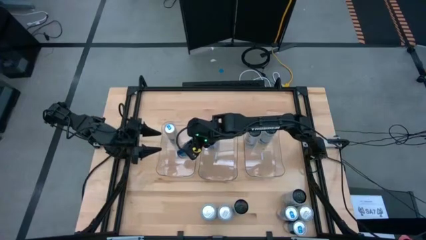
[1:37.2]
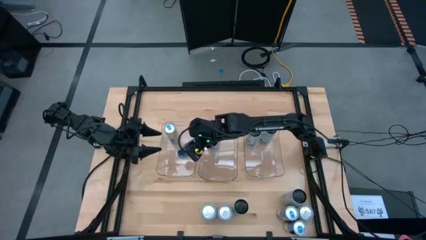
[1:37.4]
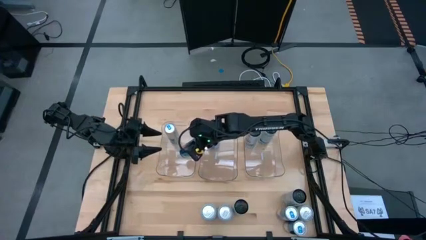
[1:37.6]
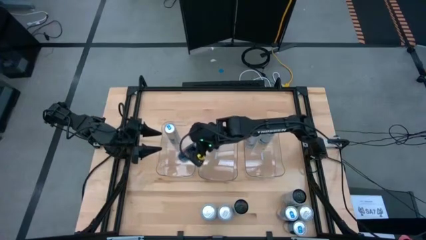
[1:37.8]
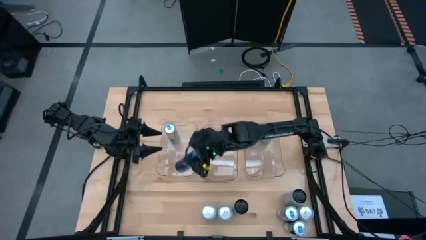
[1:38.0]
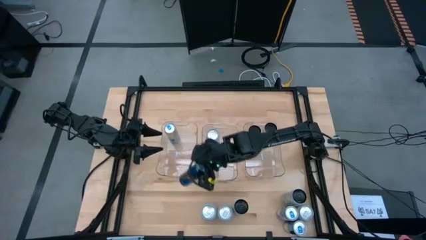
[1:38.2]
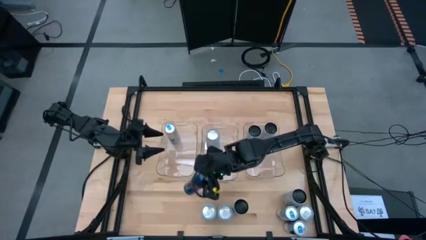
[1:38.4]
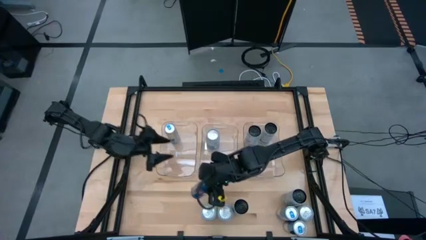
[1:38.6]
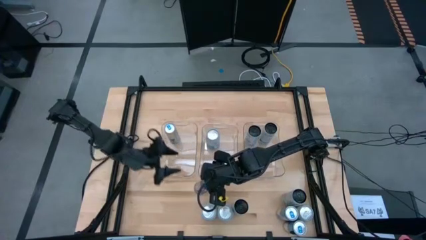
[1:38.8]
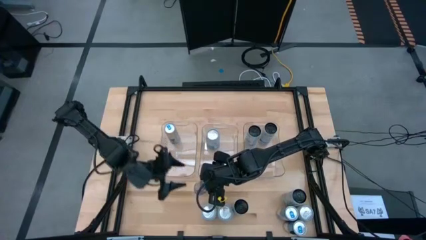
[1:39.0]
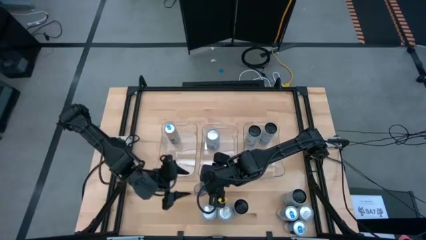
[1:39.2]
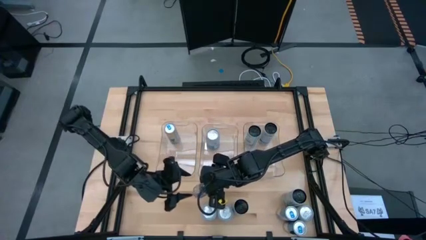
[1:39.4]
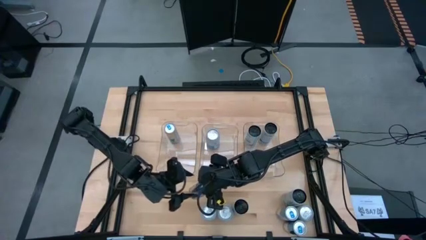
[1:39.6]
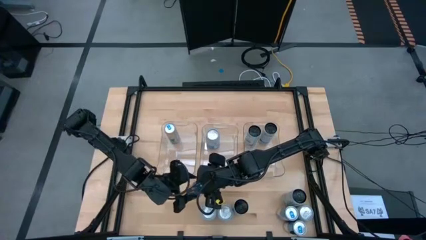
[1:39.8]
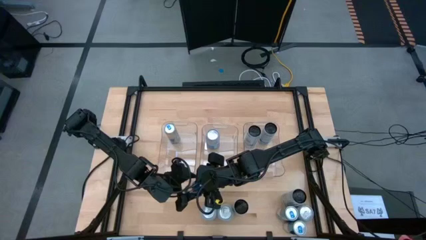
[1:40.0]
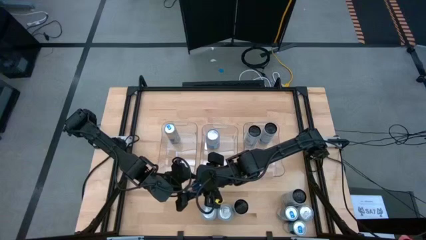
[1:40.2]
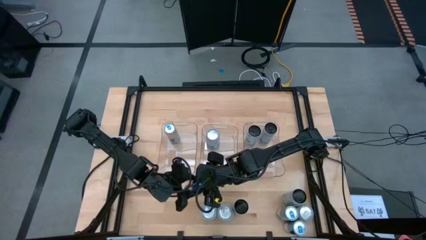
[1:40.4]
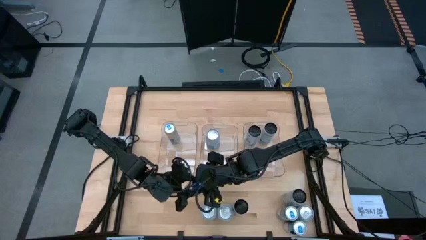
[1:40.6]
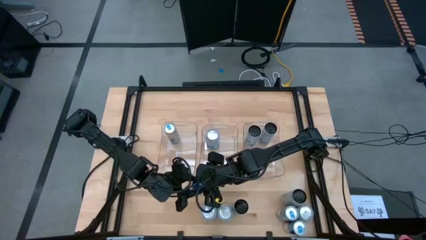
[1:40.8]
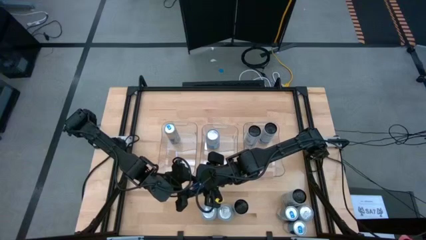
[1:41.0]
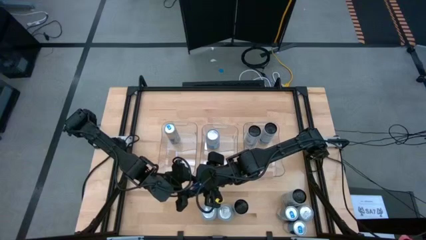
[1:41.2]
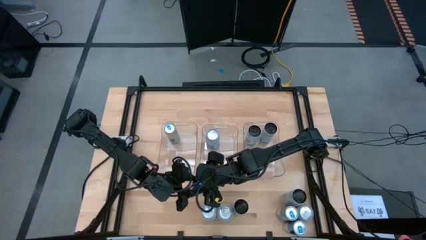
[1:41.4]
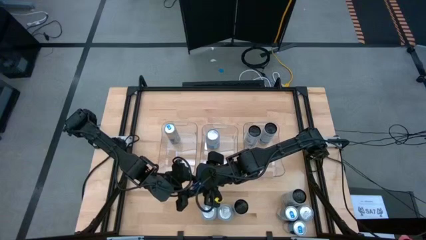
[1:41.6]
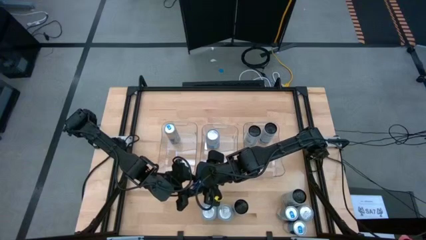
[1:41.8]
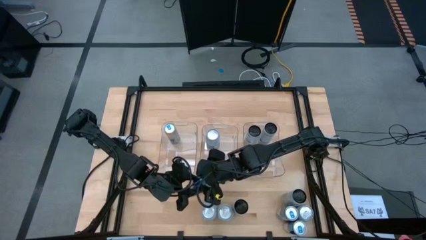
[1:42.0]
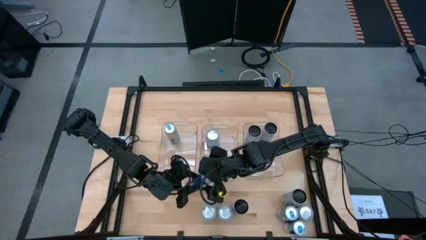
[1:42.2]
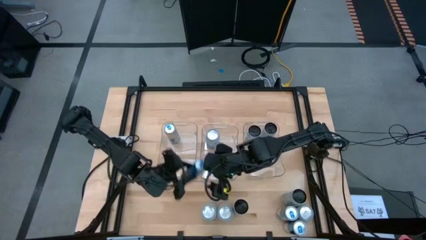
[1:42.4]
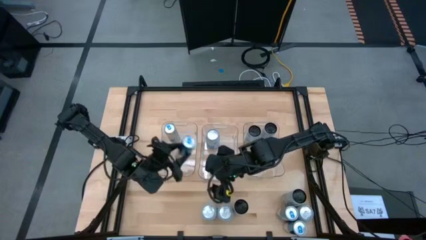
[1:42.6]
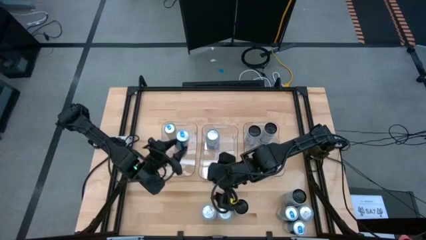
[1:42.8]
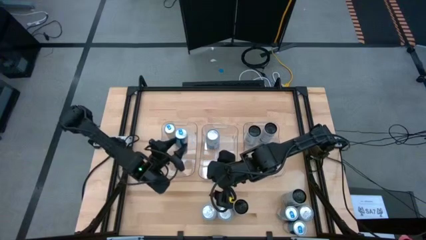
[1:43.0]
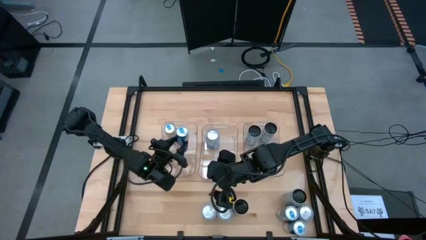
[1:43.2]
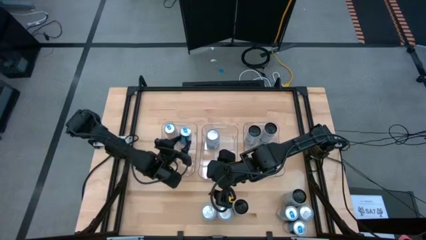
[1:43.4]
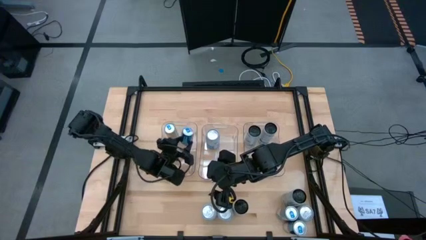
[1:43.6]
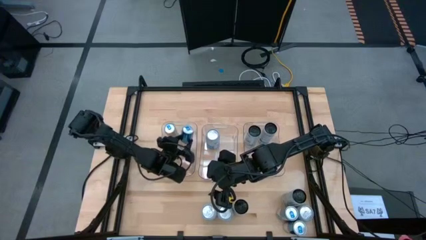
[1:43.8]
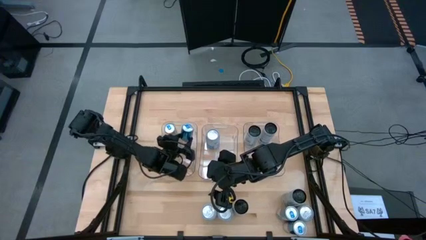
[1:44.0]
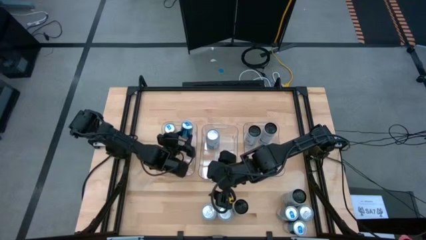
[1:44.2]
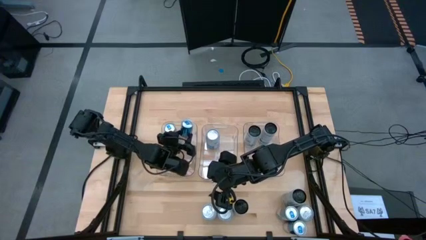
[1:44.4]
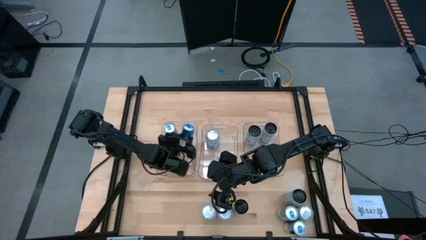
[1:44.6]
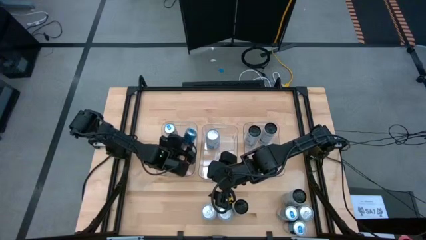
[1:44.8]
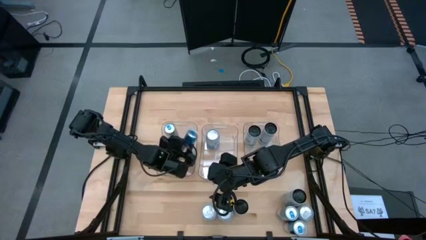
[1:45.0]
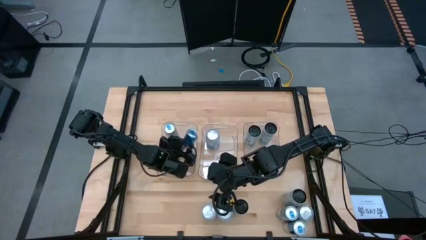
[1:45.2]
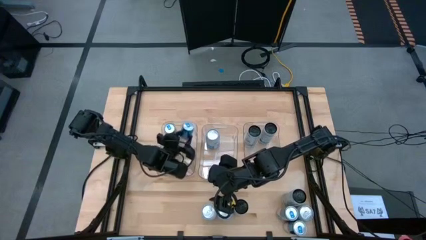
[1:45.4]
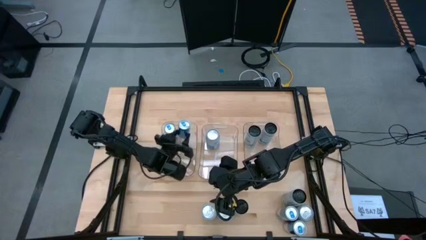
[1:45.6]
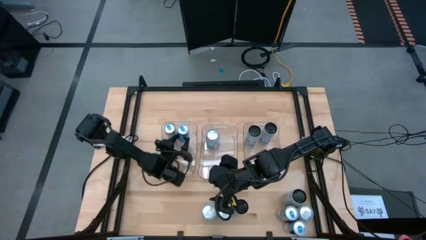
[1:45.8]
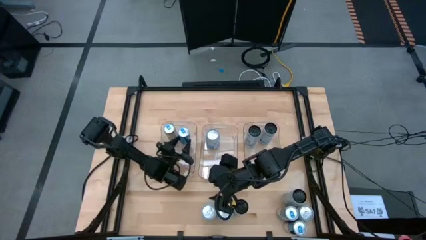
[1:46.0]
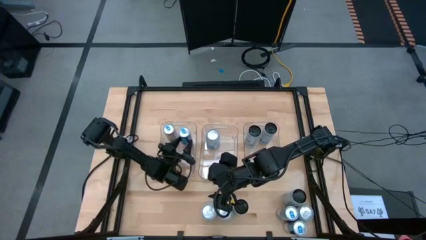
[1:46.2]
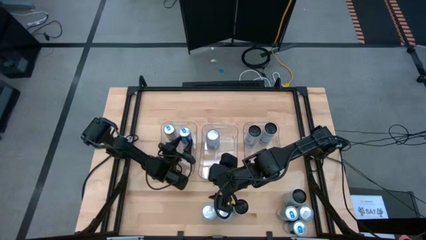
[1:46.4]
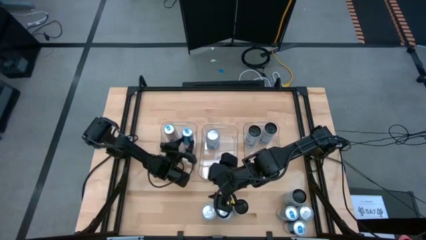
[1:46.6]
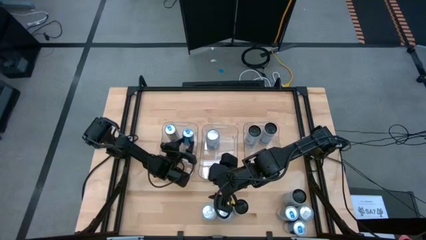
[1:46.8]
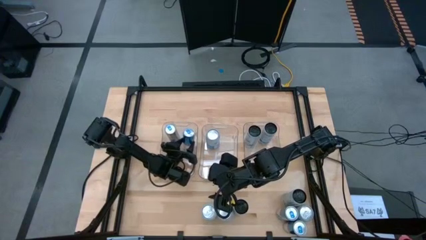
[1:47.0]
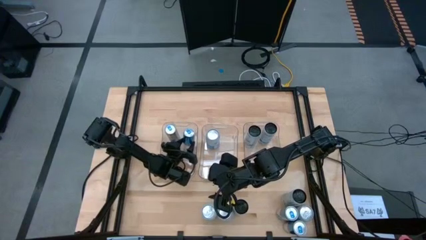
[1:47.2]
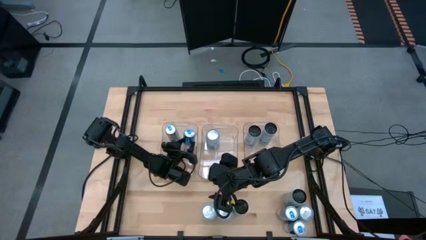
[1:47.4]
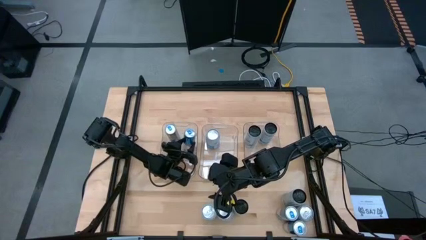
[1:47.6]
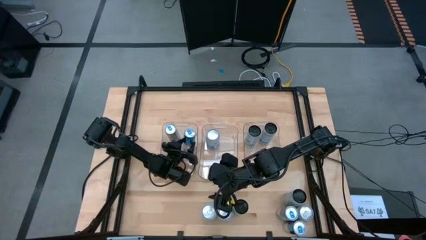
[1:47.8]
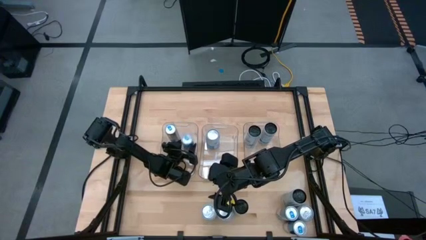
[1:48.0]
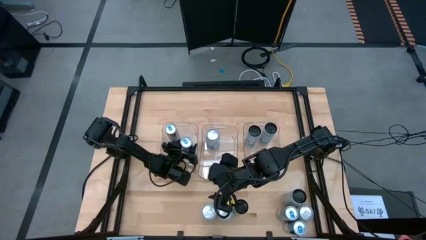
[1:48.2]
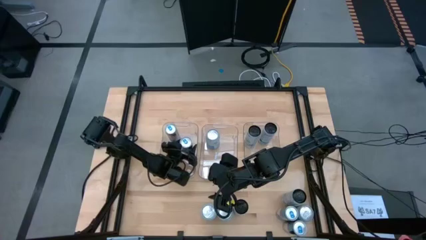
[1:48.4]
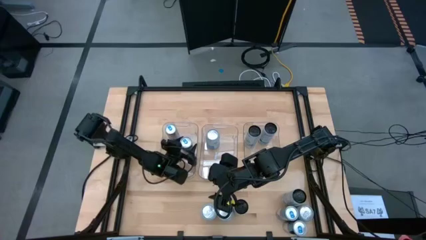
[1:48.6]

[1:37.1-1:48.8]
Task: Sort soda cans
Put the top blue soda can into the left transparent bin

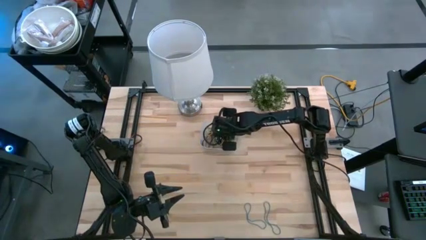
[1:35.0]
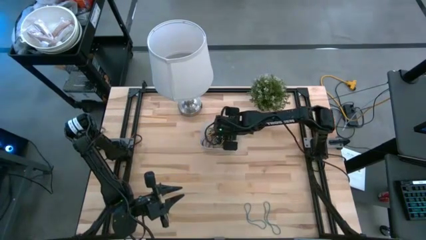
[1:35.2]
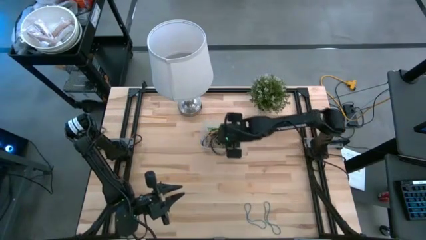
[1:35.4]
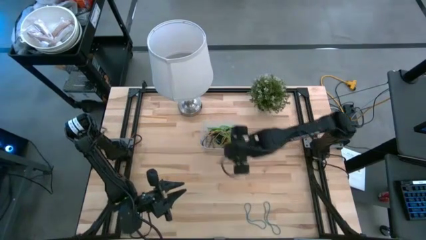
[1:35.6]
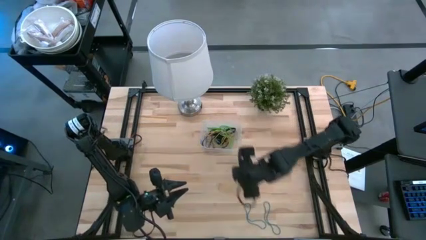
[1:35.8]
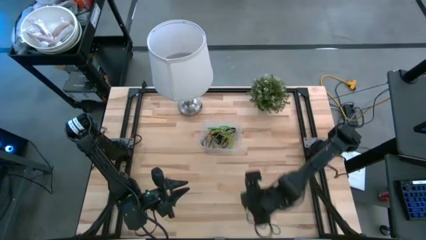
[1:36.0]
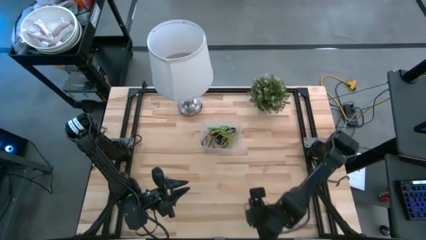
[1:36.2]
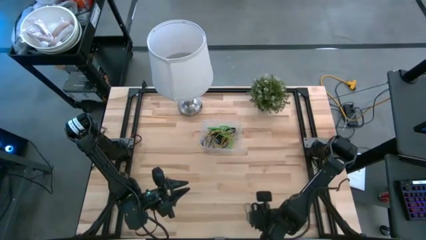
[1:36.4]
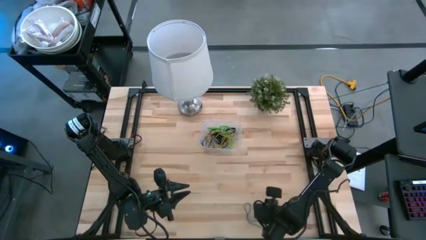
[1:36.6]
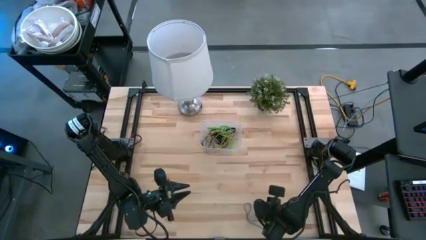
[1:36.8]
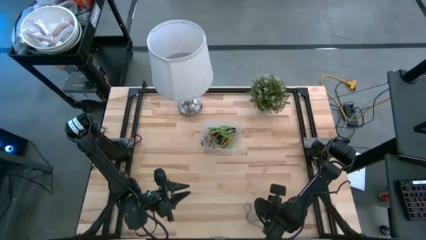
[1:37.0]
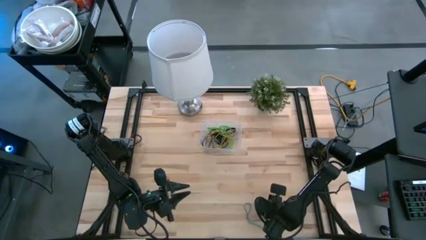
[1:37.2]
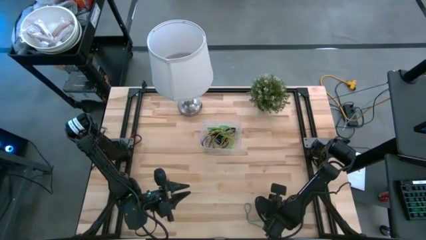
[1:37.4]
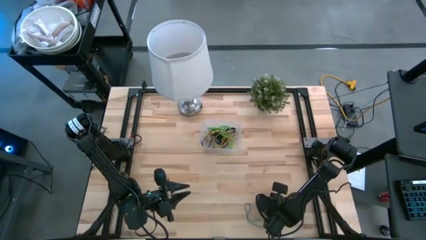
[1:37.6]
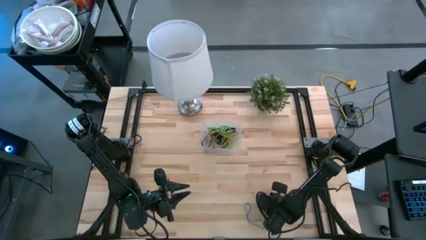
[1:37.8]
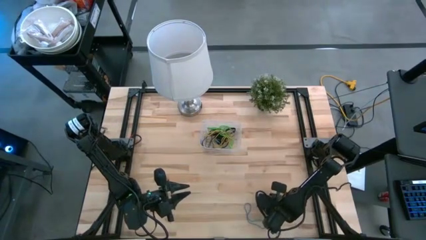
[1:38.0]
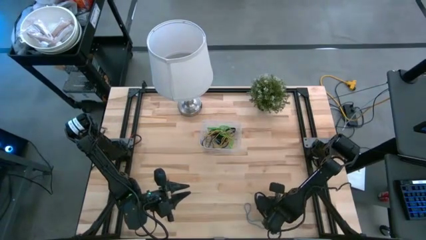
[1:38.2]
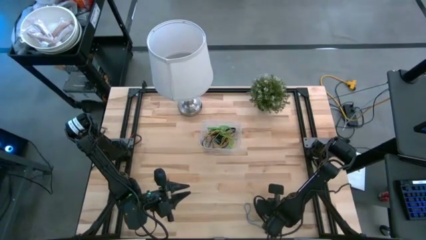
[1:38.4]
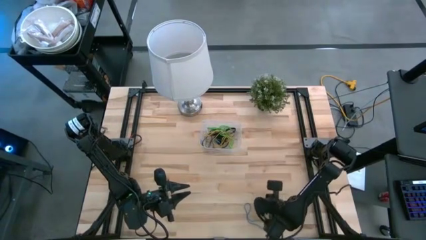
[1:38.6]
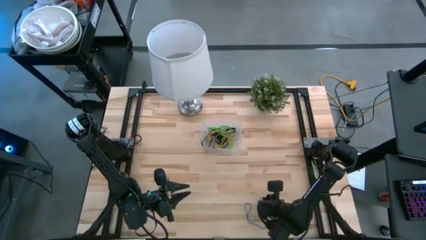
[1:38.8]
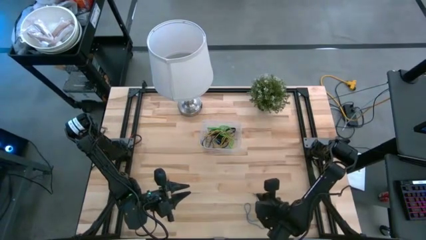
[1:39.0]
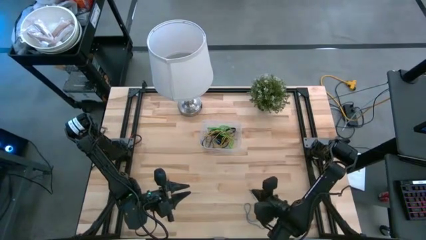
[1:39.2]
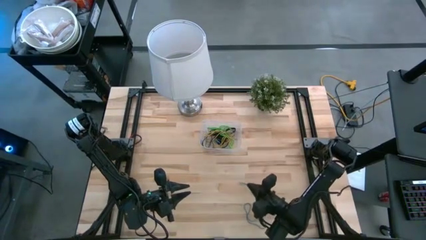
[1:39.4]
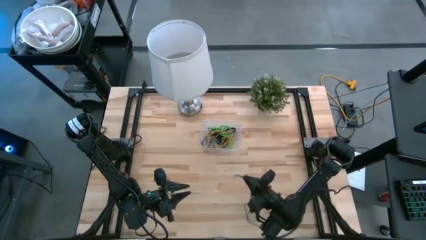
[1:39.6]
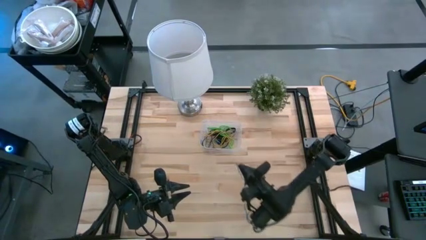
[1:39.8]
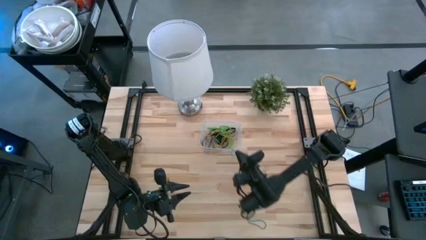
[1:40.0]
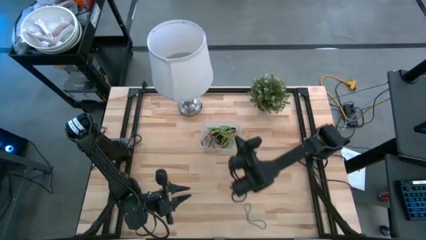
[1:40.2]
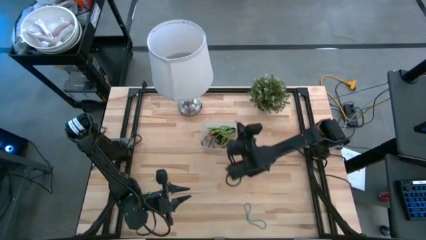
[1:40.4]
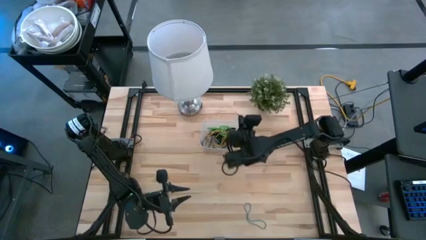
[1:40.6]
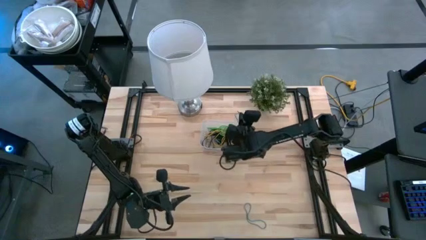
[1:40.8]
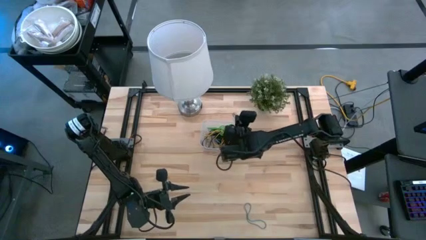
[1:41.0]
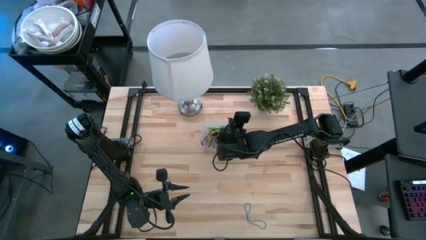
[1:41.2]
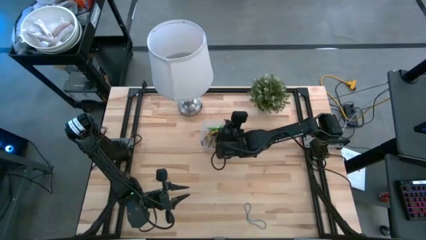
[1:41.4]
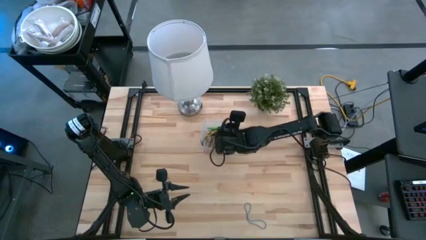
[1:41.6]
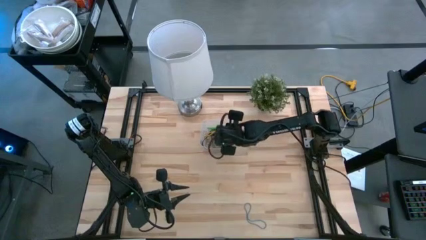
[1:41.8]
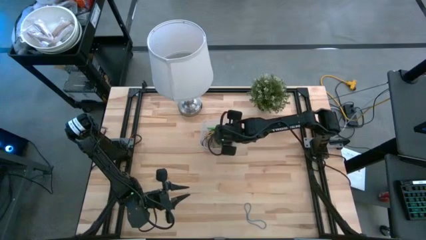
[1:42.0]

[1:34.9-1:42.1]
Task: Pick and place rubber bands into bin
Put the blue rubber band into the transparent bin
